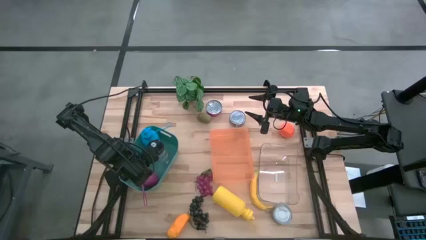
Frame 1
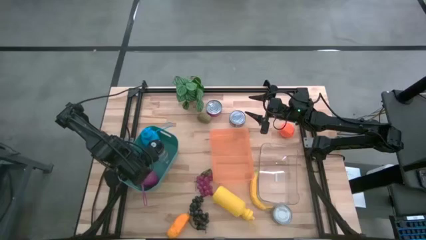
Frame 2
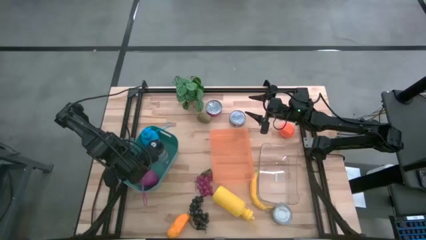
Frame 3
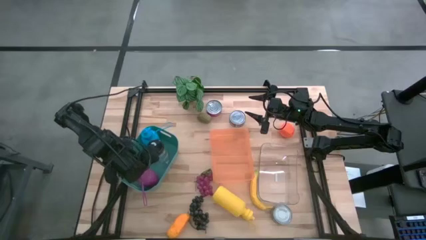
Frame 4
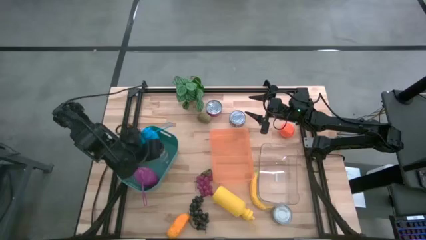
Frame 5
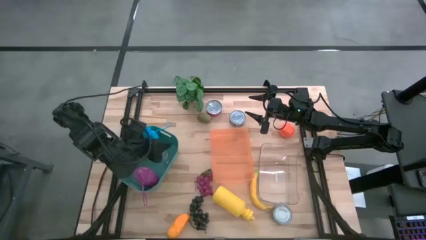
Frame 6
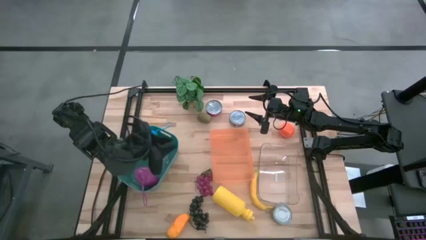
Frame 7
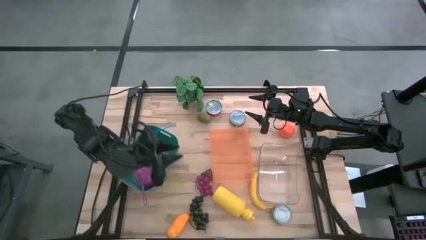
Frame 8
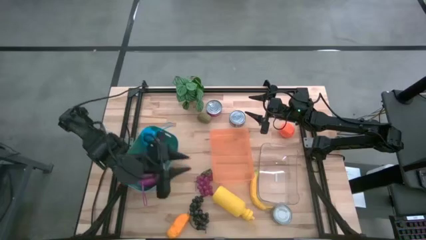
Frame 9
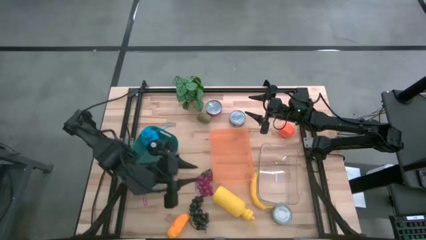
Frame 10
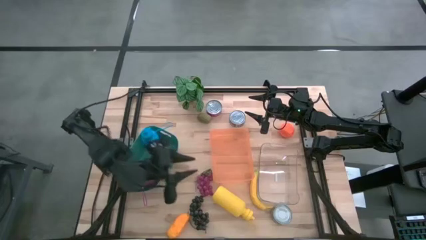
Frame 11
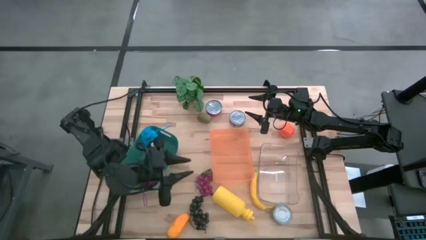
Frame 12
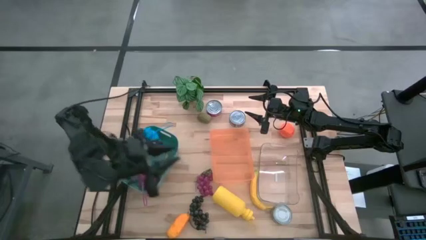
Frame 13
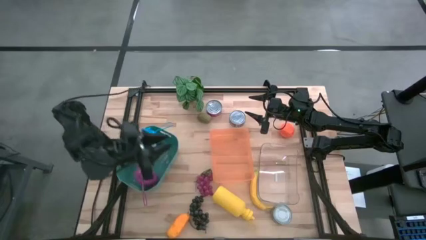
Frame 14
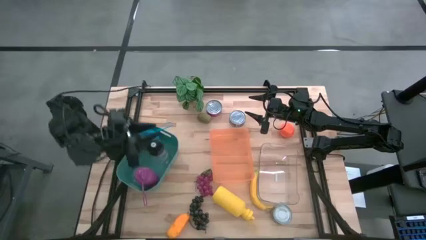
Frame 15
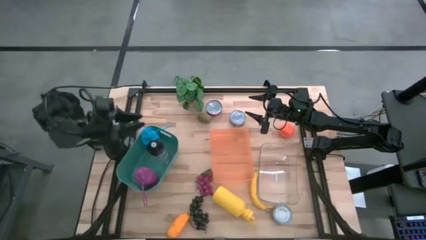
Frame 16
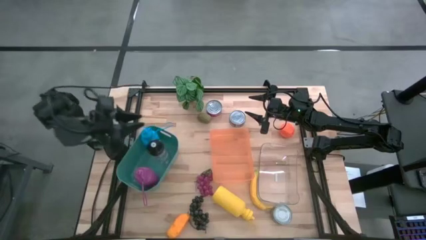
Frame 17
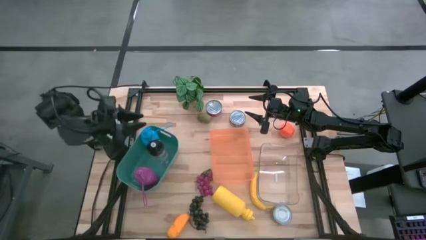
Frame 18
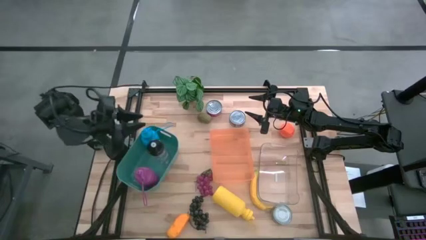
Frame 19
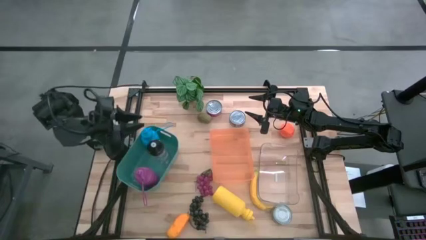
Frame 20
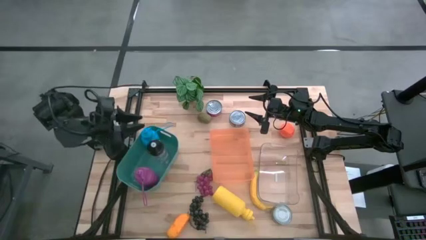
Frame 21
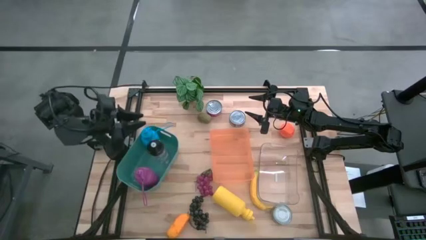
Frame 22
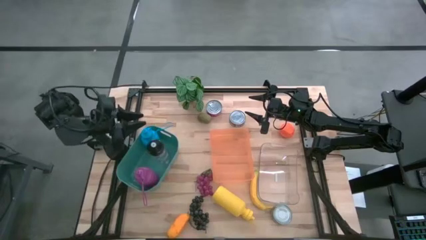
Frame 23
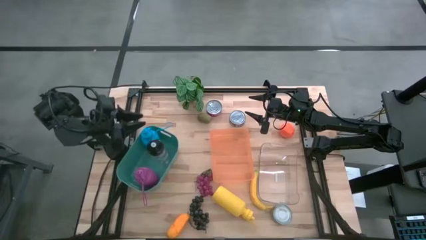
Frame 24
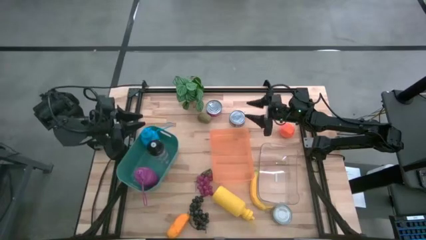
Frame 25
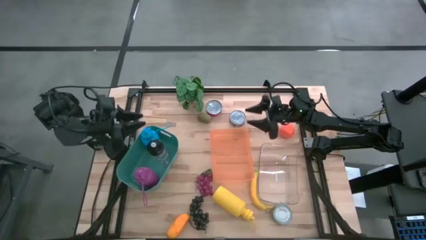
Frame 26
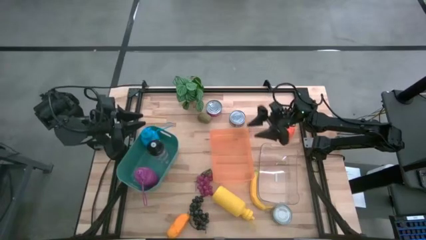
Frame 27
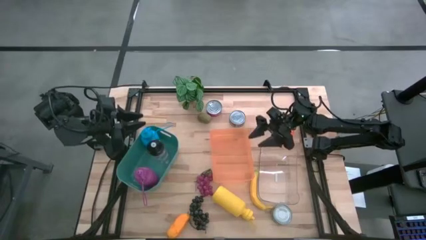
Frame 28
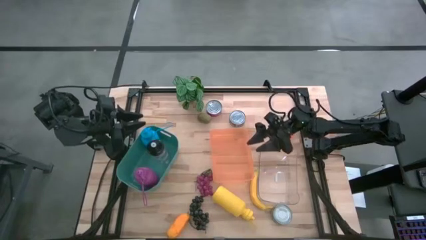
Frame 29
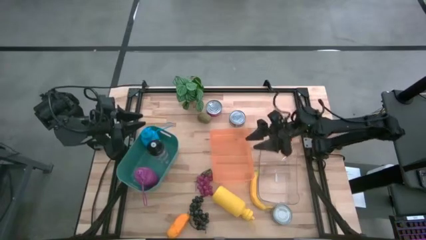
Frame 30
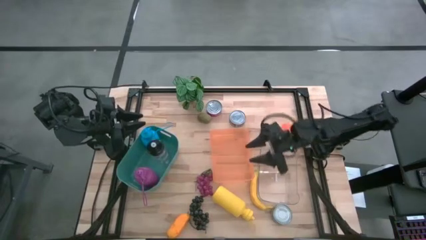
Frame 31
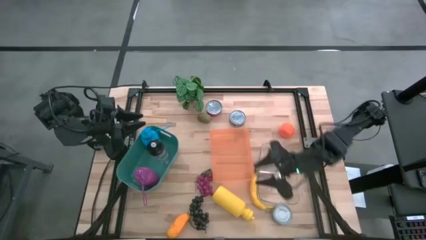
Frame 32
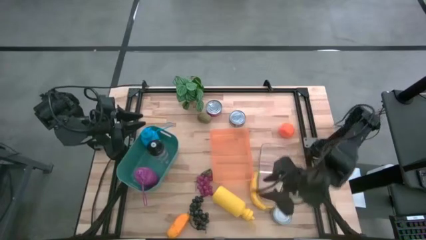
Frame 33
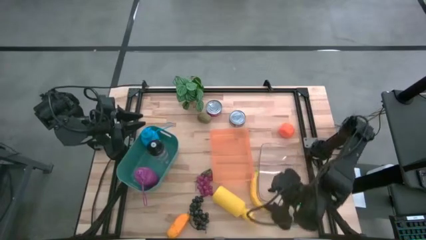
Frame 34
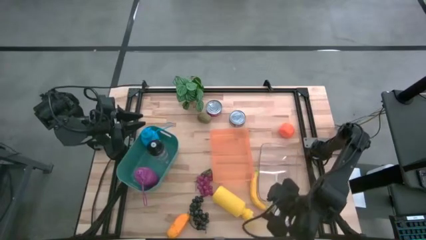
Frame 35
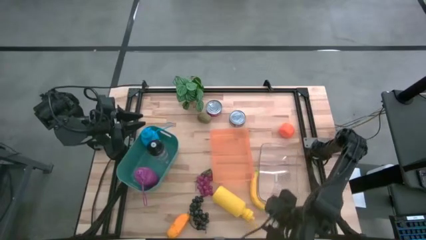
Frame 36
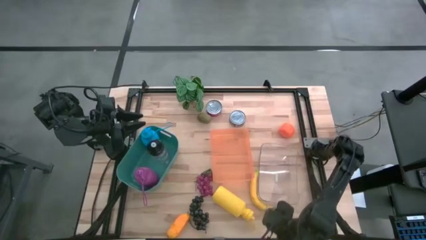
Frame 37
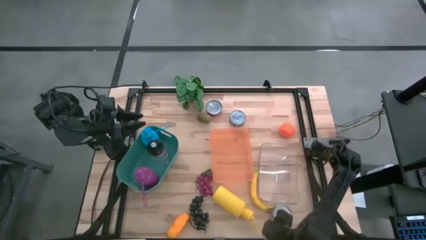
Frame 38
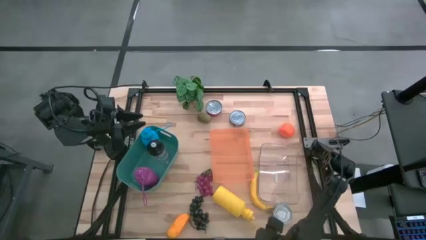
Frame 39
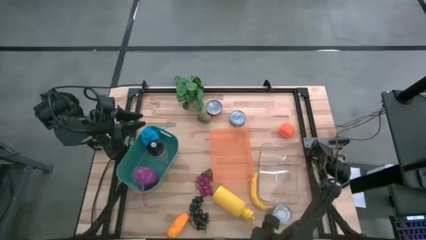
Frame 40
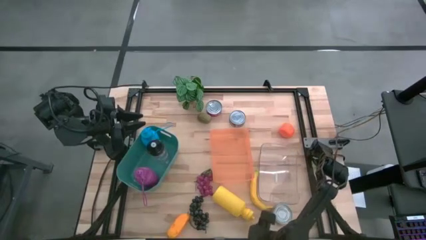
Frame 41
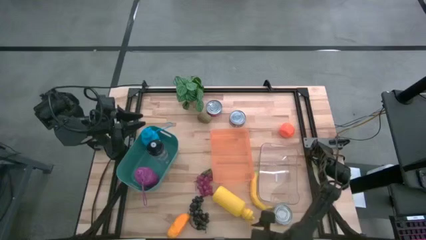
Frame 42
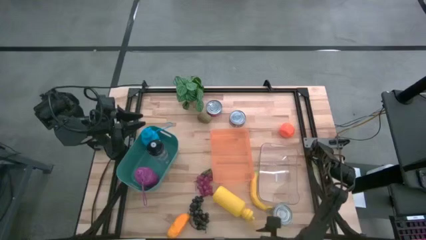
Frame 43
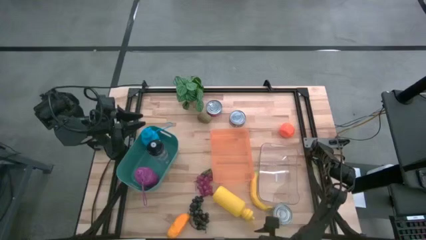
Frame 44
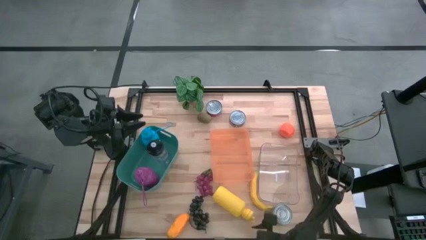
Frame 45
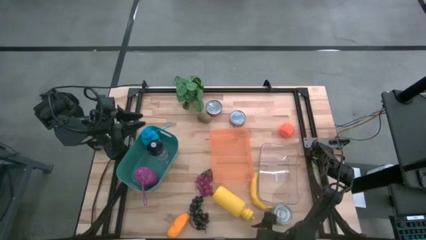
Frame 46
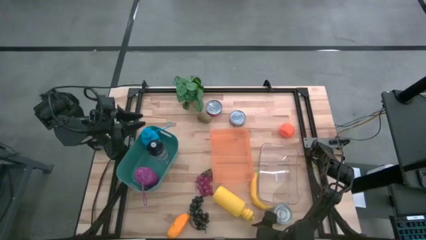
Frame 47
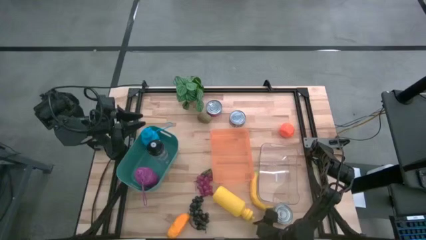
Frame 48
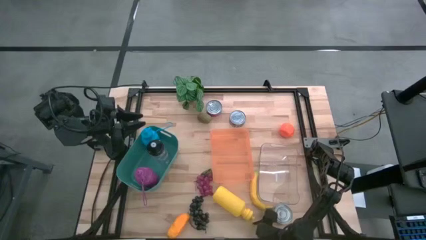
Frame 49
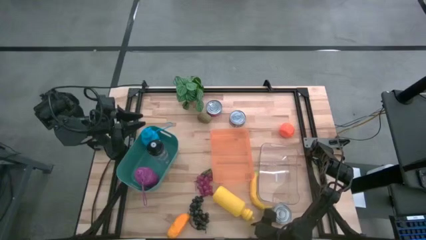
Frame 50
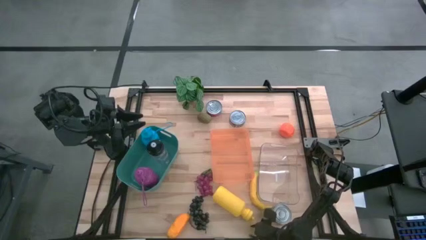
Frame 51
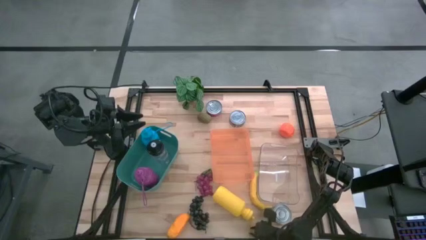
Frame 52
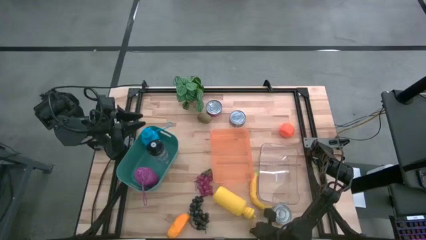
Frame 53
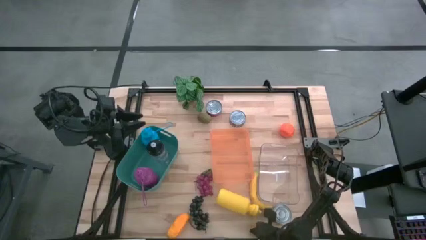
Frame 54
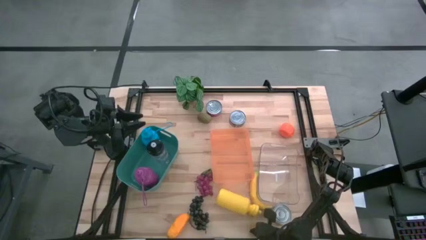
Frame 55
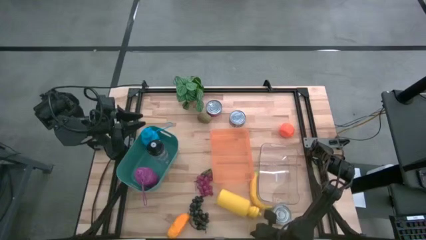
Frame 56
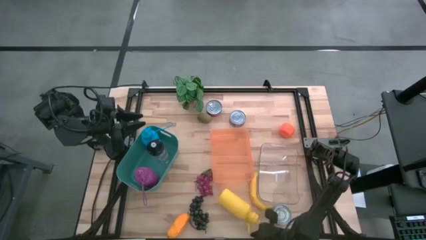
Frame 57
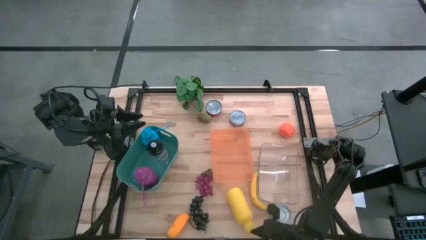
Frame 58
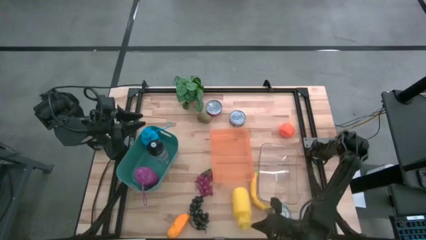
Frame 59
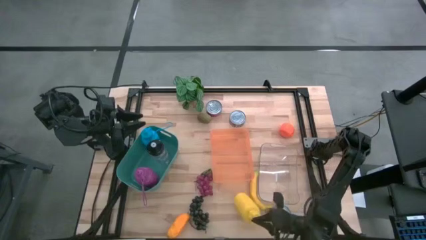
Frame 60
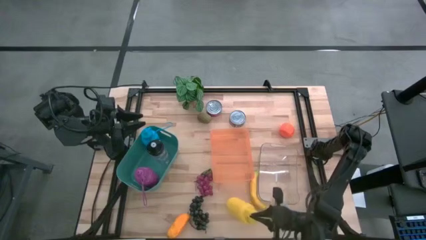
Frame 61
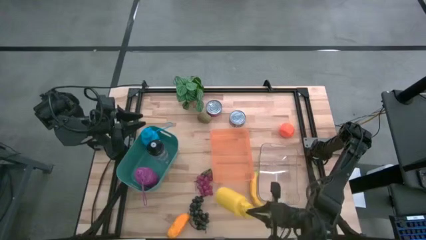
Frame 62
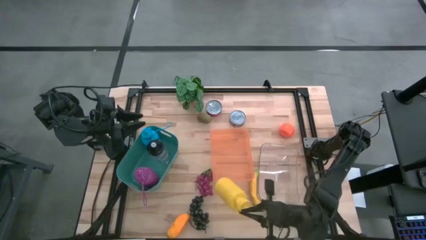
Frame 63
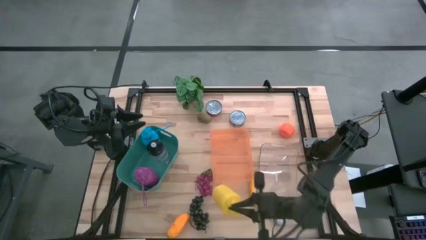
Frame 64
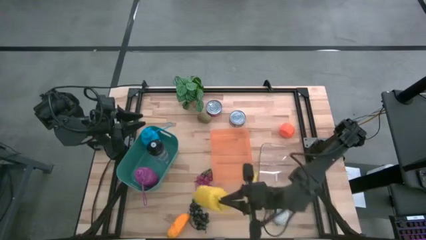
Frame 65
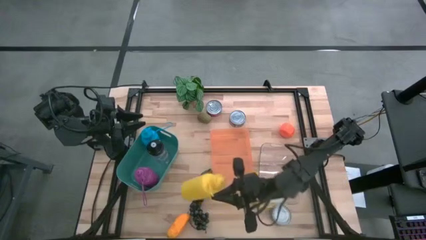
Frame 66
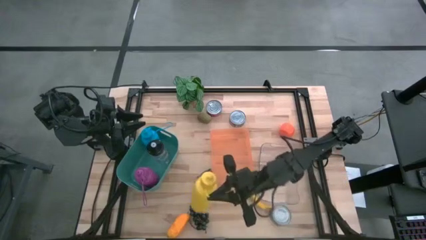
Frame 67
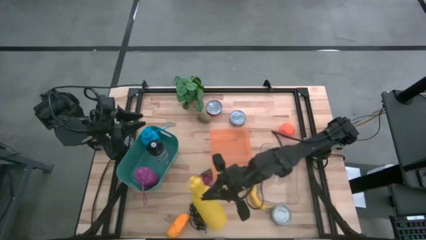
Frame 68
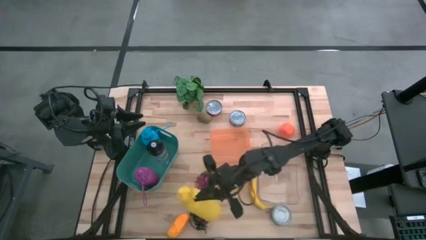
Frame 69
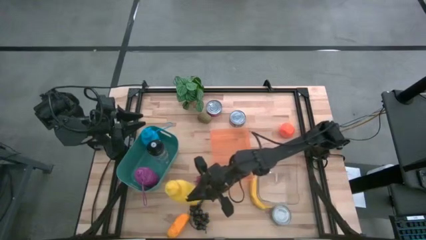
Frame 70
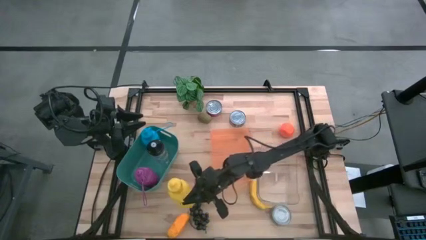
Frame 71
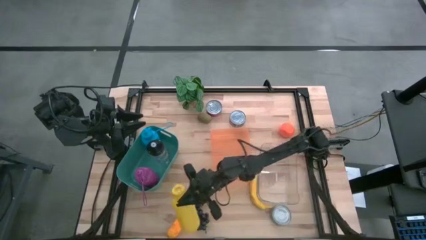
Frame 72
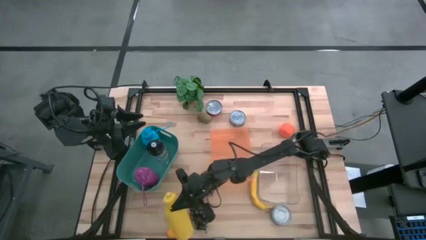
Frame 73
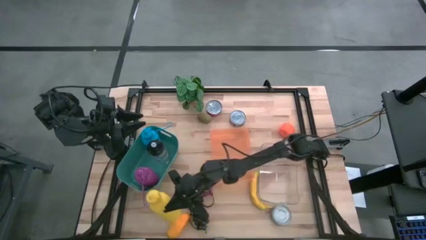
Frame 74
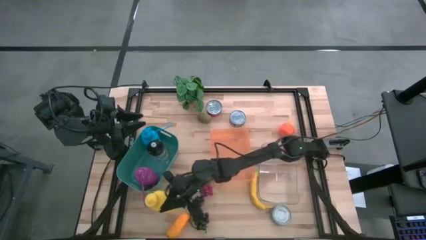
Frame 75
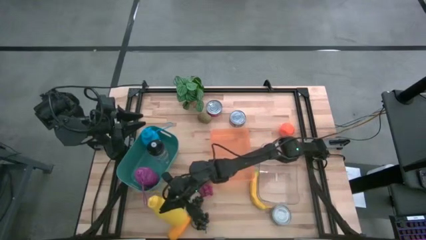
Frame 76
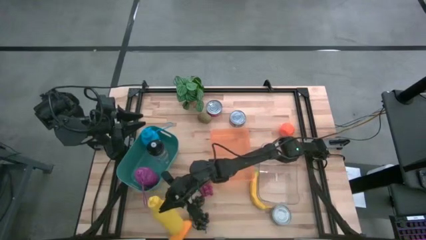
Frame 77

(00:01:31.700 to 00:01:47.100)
Task: Pick & Place Food Item
Put the yellow water bottle into the green bin
